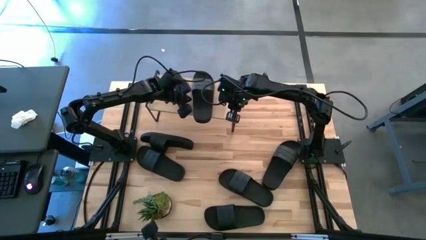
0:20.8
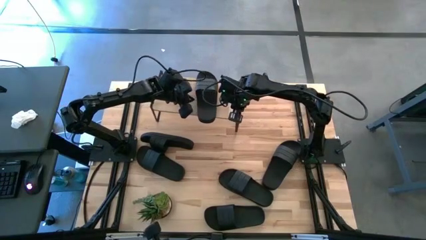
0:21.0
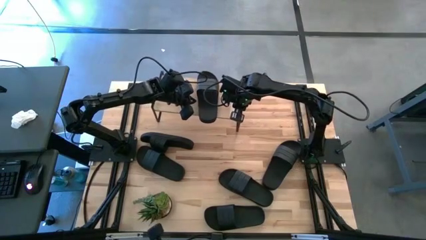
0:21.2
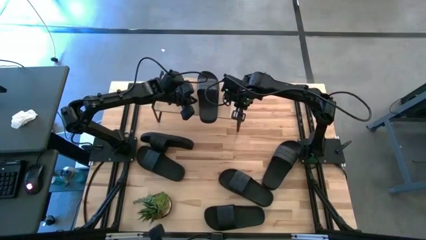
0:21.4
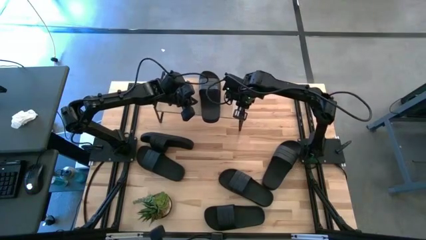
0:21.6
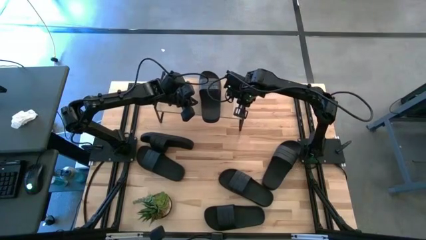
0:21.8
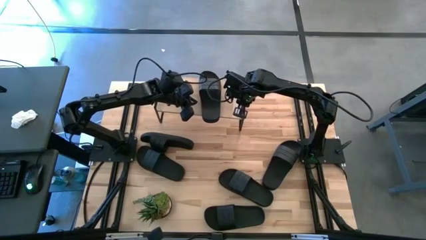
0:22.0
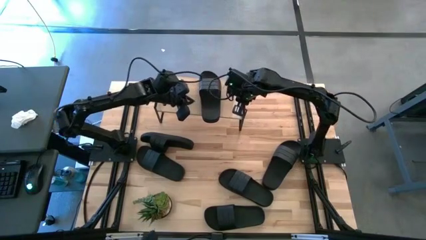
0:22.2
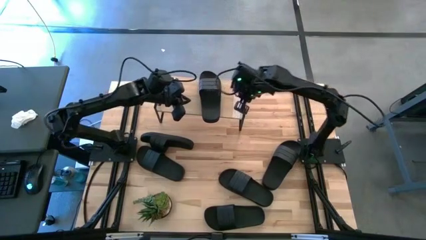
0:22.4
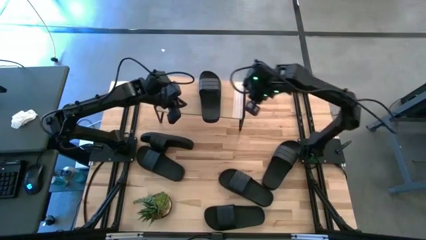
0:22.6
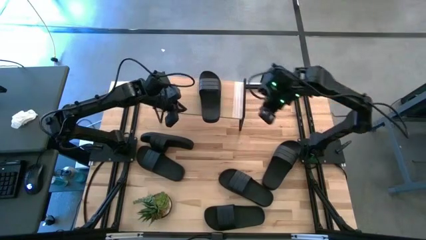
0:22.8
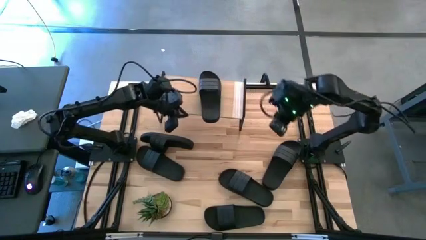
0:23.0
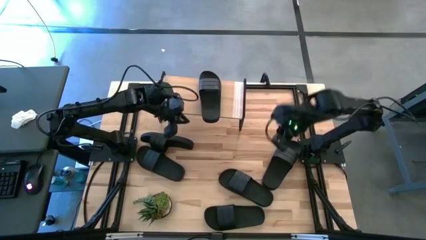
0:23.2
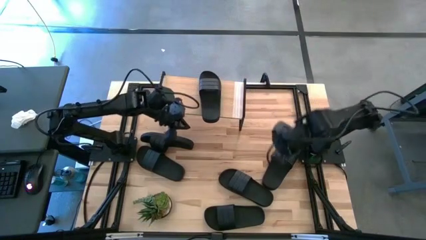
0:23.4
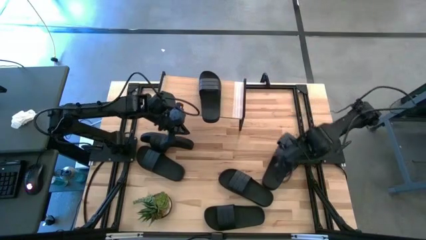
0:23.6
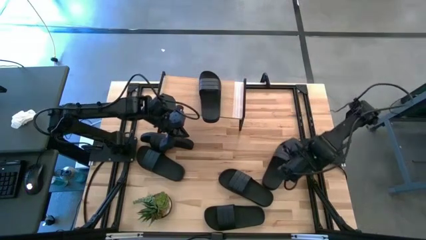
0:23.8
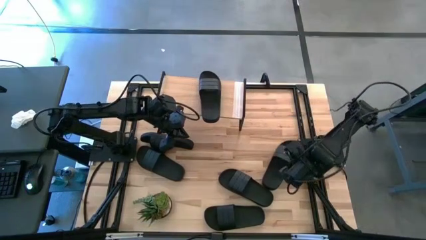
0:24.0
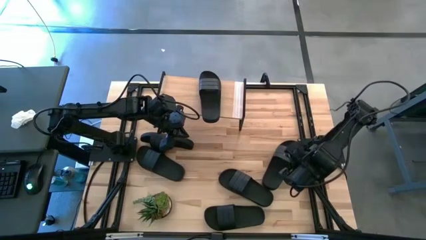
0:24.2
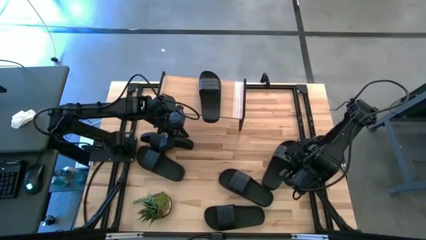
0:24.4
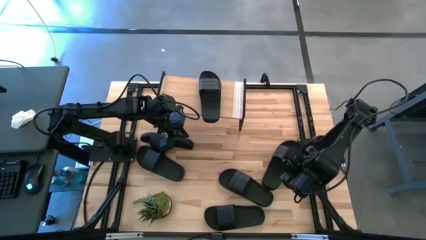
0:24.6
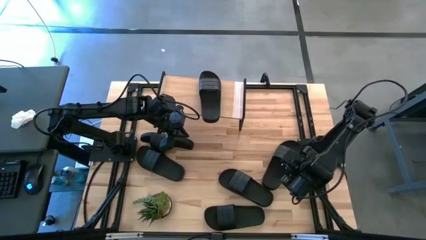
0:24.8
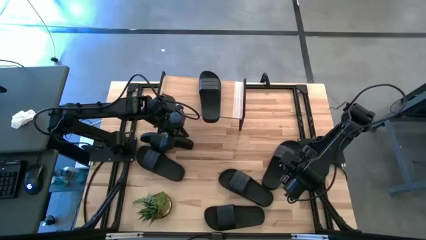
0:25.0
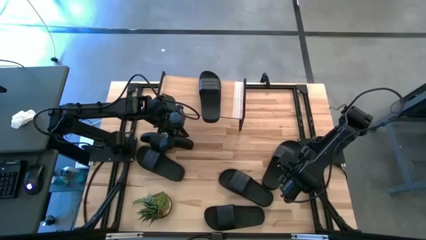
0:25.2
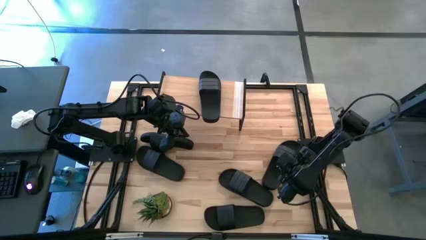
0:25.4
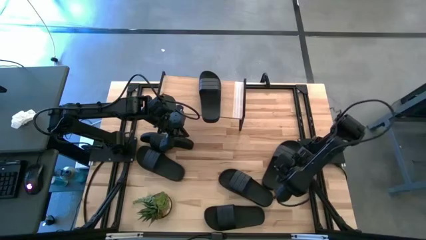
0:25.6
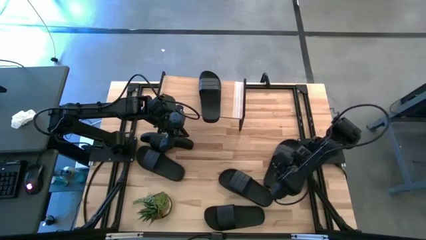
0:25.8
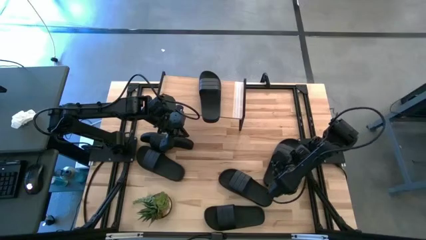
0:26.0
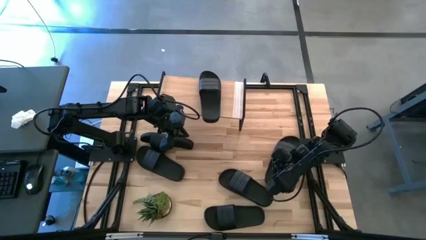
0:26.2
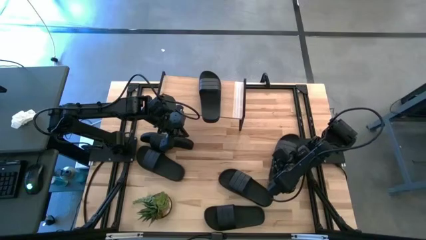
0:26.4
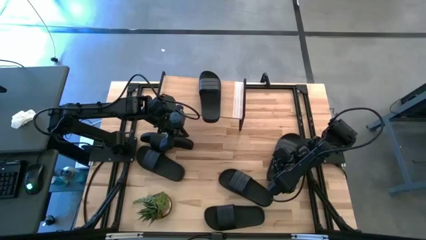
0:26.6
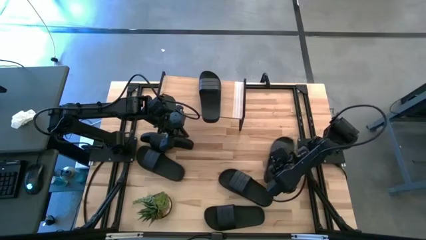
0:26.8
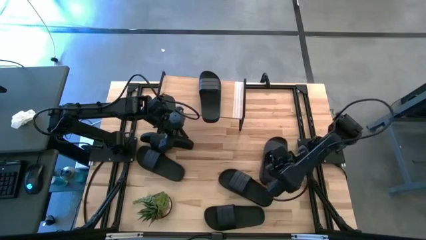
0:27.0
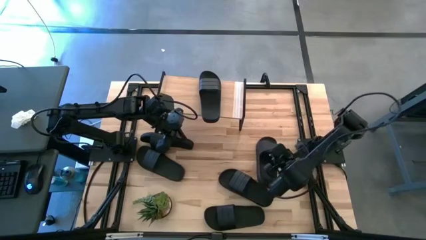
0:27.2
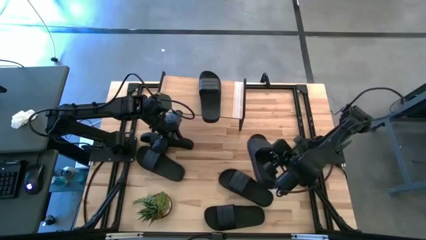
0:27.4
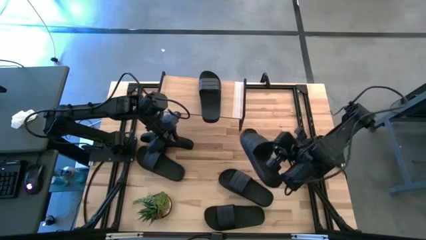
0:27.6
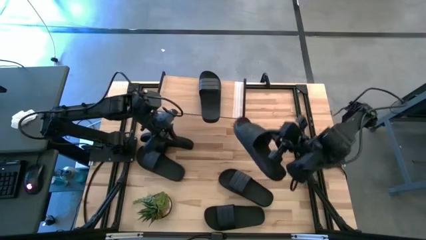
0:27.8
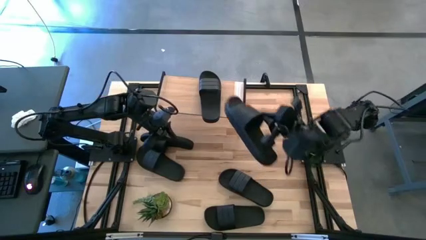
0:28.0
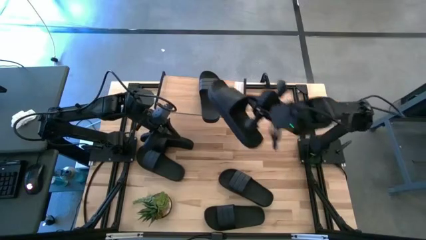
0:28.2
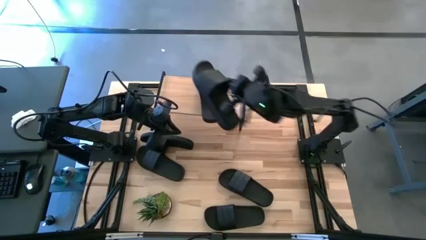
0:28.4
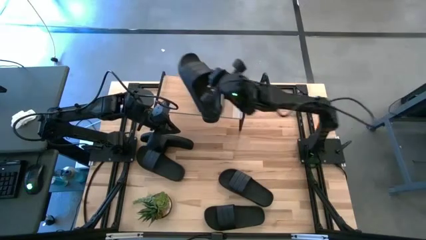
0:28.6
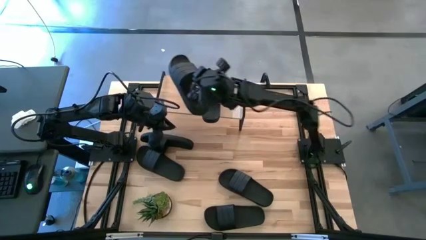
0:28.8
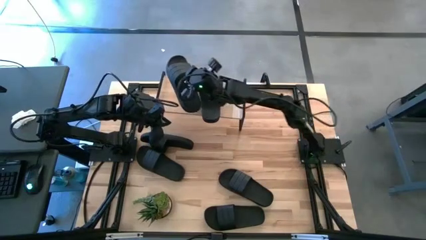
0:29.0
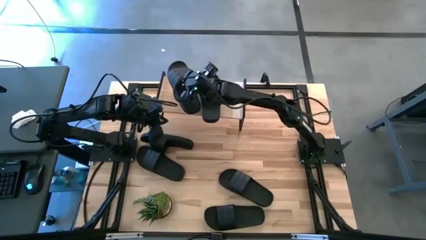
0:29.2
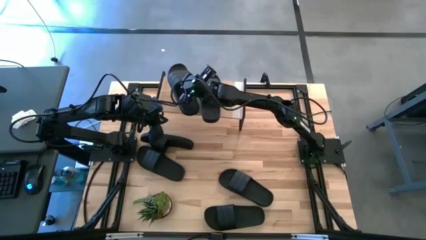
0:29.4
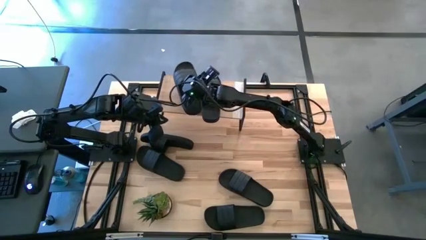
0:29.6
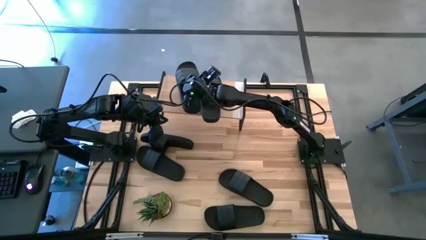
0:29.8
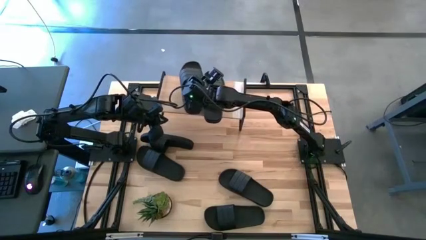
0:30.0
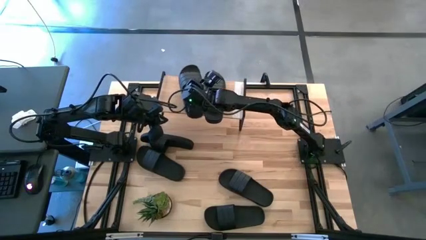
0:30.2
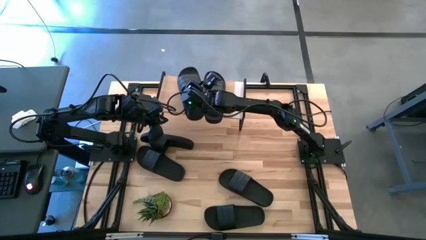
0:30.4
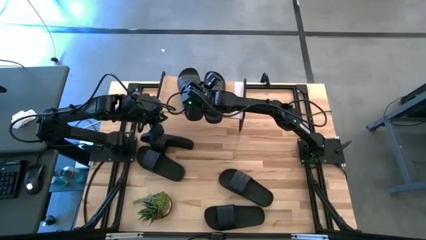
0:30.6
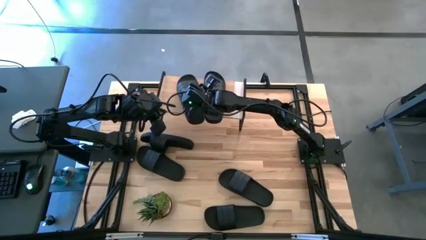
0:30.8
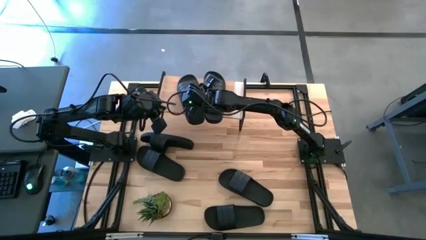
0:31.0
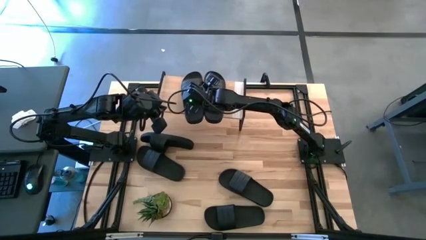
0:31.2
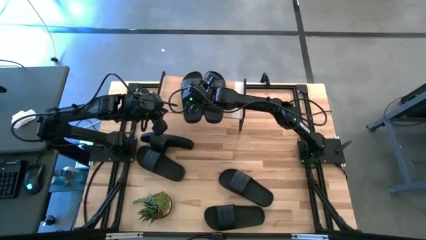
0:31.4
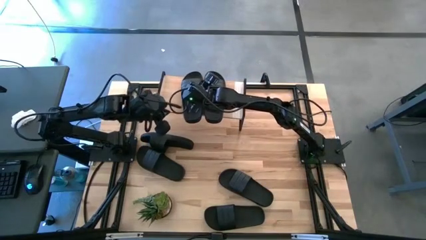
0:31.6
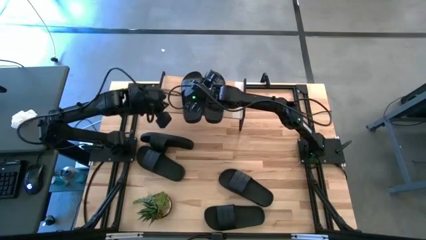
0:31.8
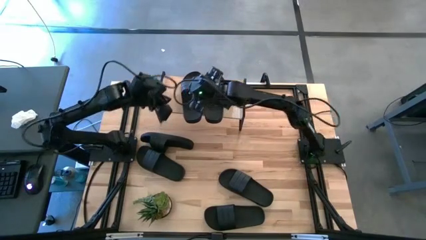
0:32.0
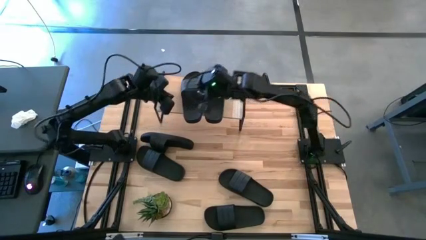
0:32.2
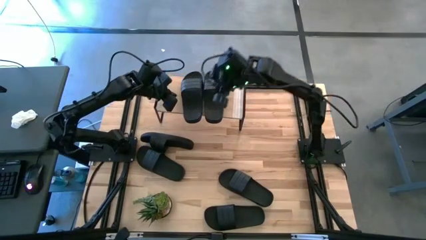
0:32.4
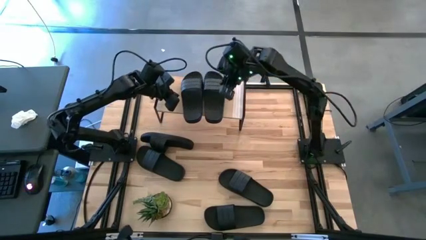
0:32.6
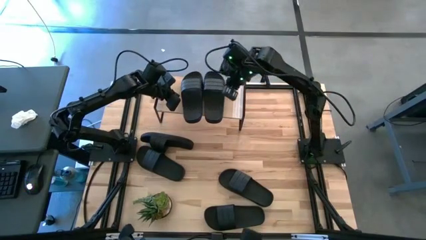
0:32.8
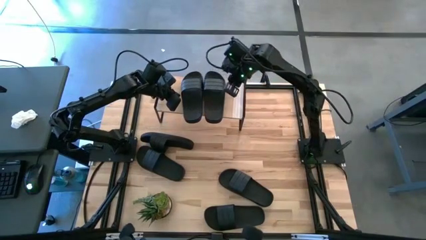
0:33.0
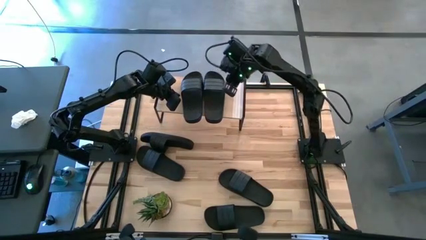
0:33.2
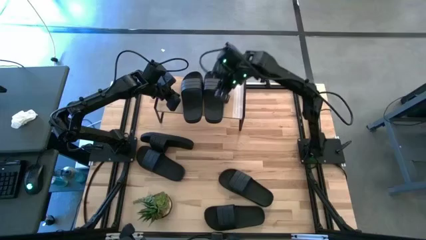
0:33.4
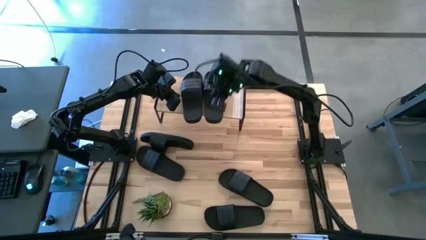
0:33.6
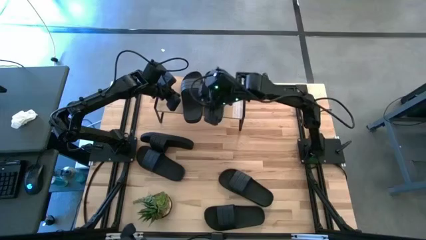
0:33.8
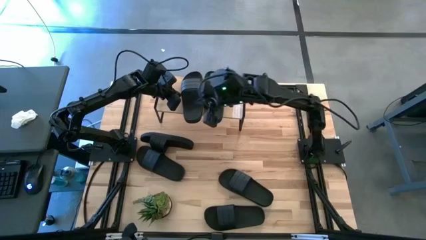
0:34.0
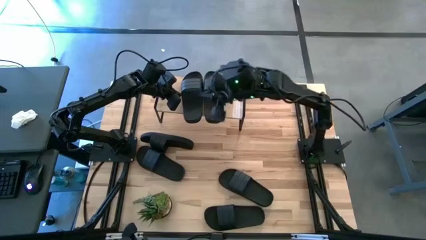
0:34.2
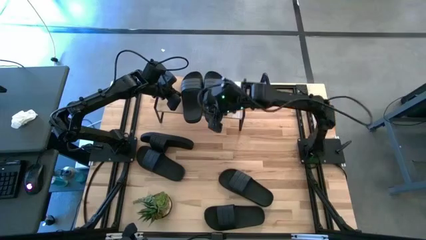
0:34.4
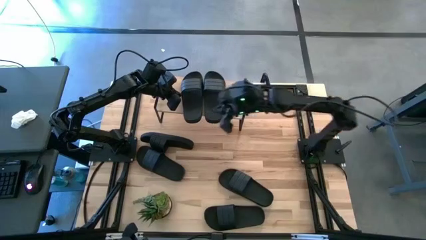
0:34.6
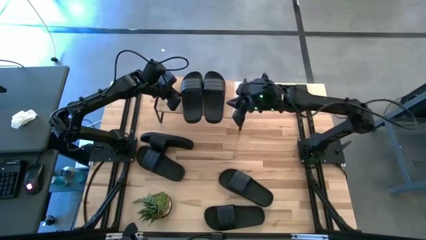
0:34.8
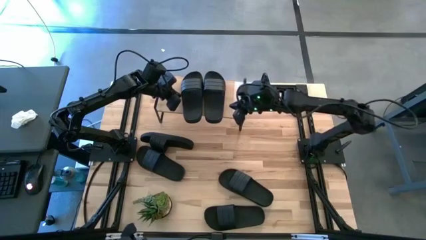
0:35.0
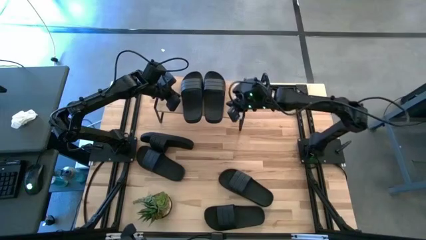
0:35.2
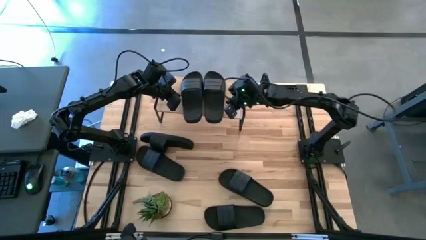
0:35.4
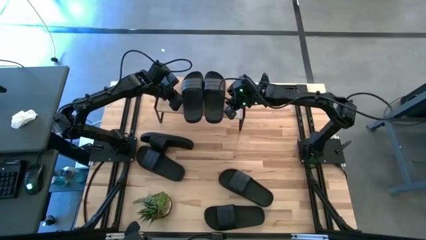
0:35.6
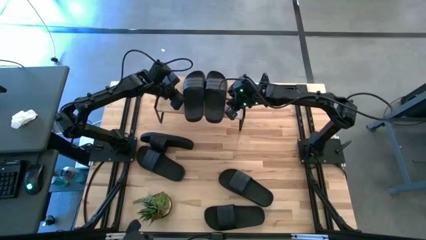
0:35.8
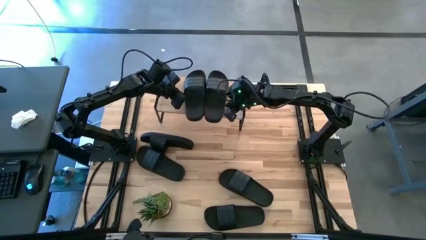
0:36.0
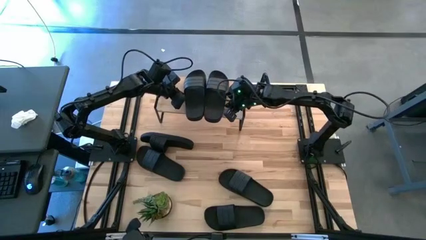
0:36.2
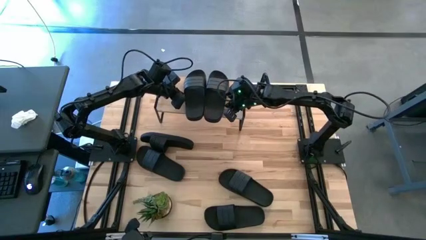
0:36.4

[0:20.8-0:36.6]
Task: Pick and place slides into the shelf
Put the black slide on the shelf
